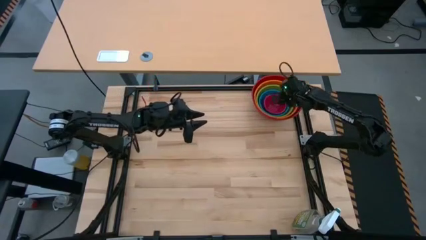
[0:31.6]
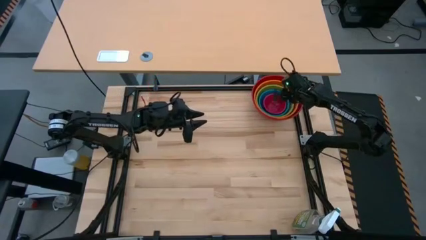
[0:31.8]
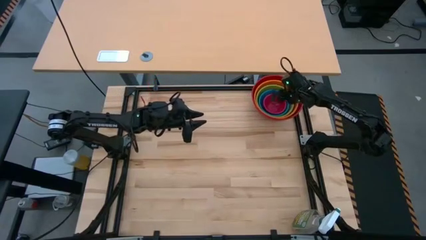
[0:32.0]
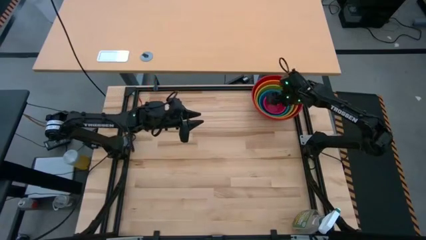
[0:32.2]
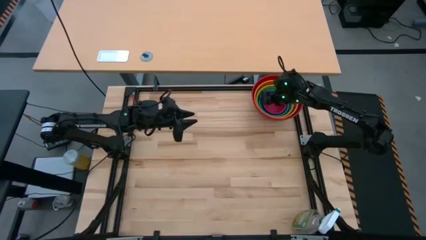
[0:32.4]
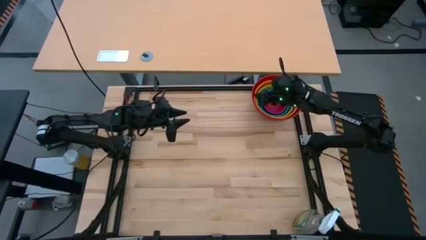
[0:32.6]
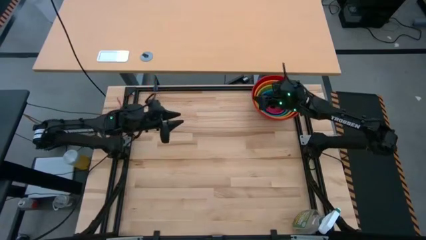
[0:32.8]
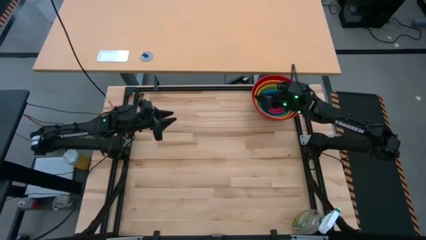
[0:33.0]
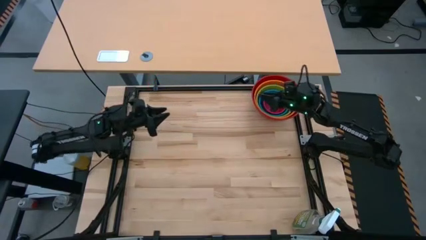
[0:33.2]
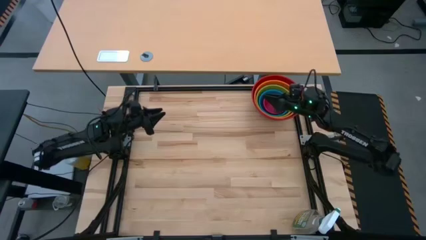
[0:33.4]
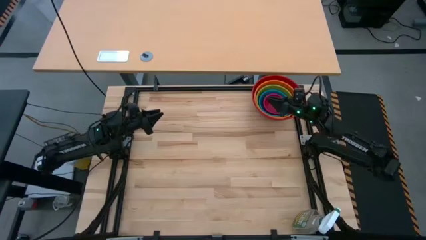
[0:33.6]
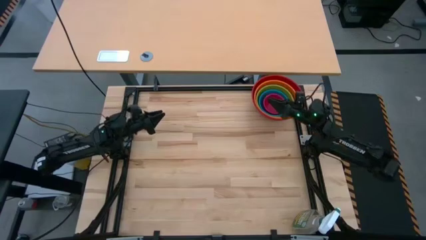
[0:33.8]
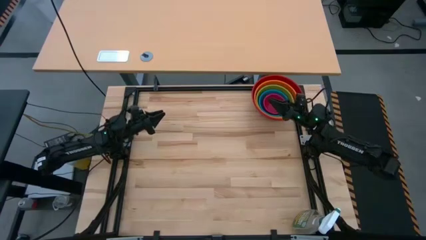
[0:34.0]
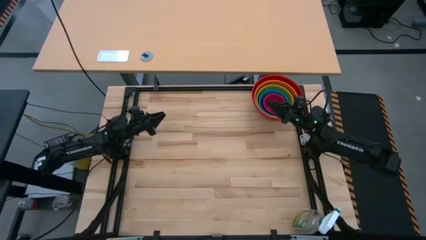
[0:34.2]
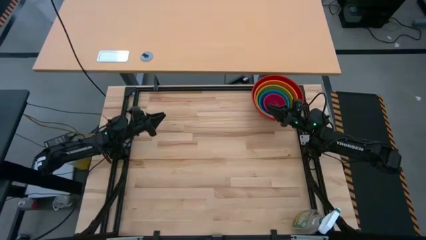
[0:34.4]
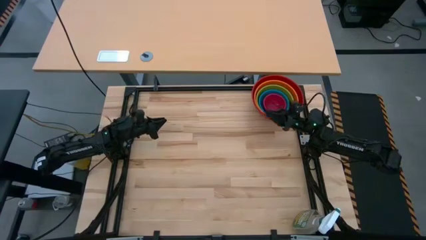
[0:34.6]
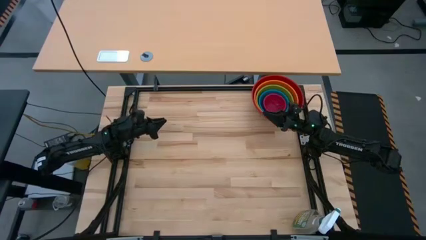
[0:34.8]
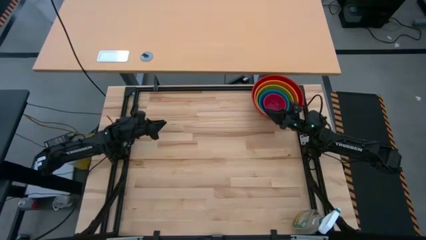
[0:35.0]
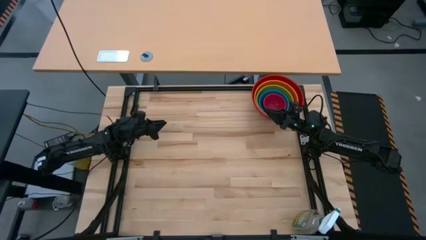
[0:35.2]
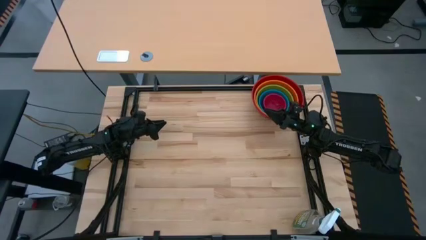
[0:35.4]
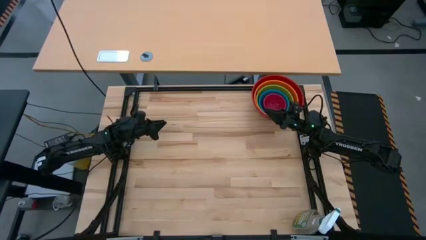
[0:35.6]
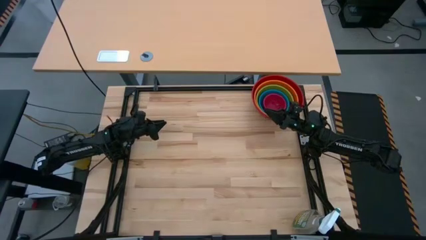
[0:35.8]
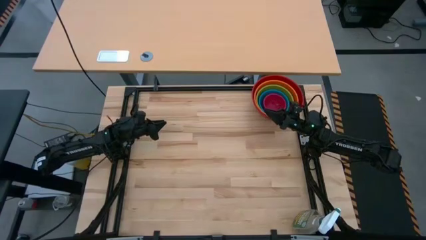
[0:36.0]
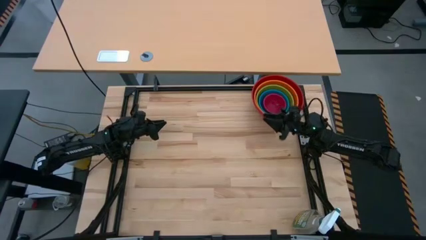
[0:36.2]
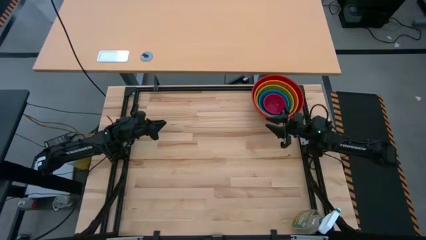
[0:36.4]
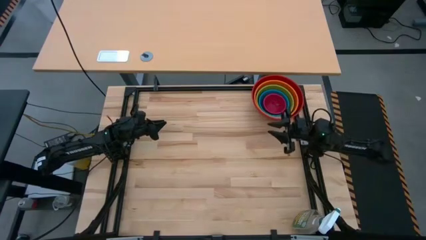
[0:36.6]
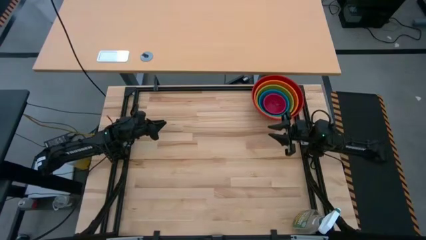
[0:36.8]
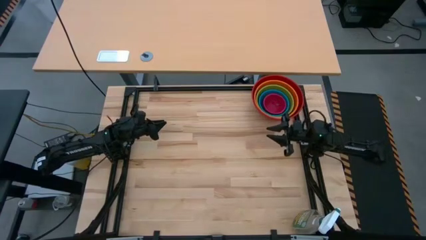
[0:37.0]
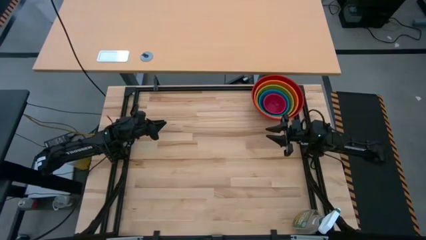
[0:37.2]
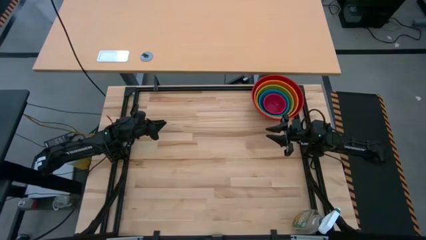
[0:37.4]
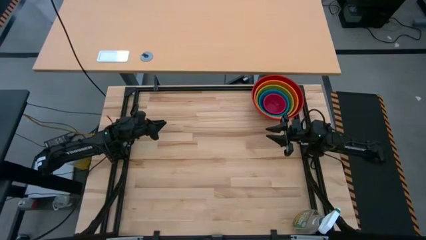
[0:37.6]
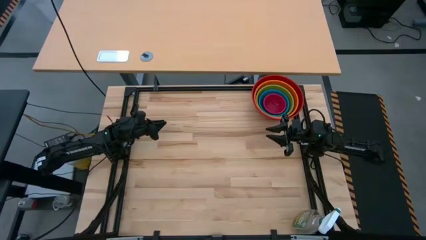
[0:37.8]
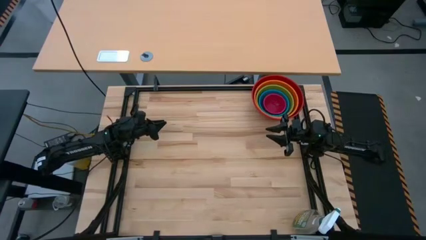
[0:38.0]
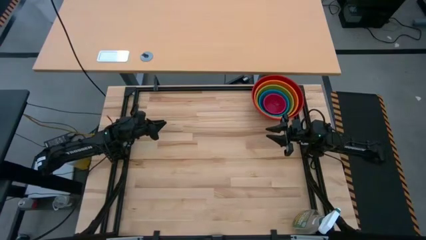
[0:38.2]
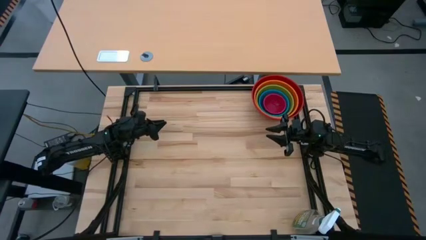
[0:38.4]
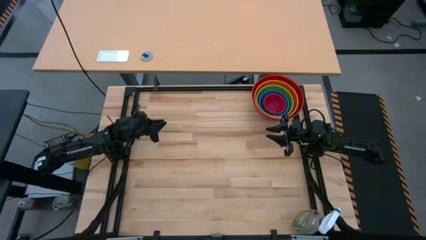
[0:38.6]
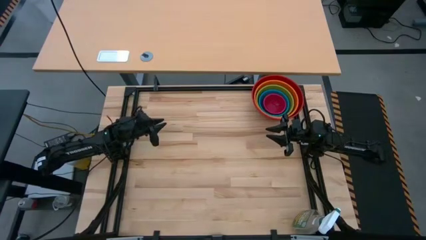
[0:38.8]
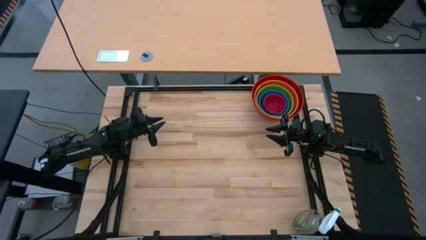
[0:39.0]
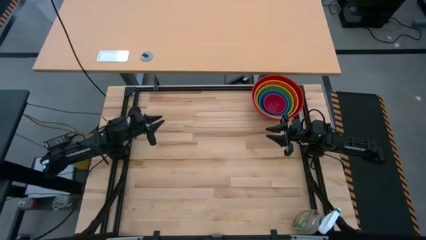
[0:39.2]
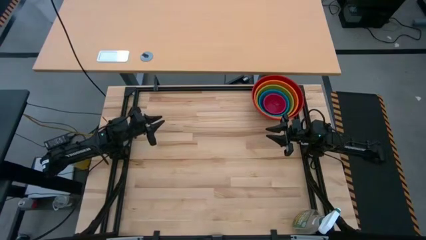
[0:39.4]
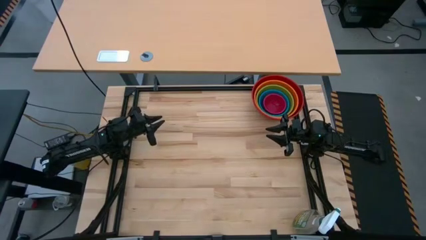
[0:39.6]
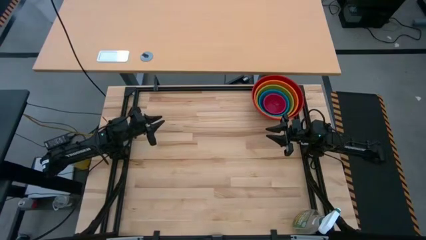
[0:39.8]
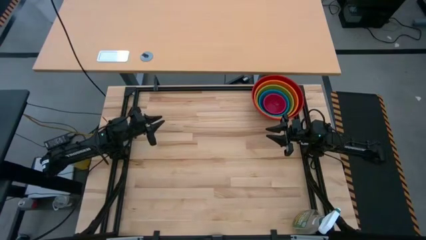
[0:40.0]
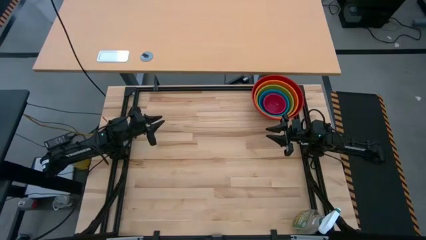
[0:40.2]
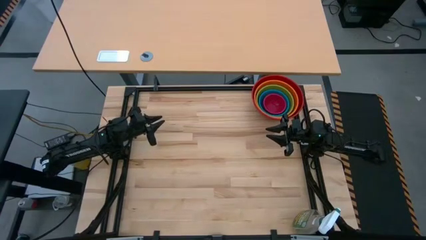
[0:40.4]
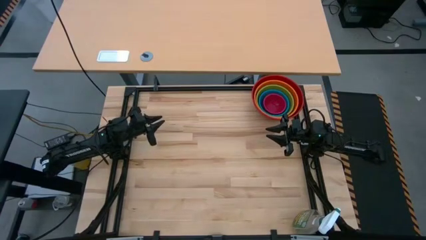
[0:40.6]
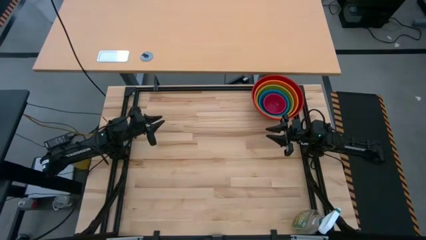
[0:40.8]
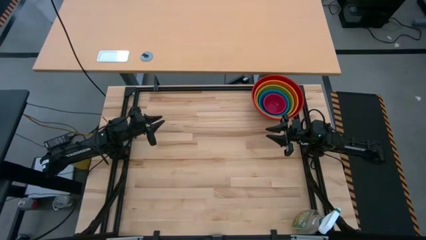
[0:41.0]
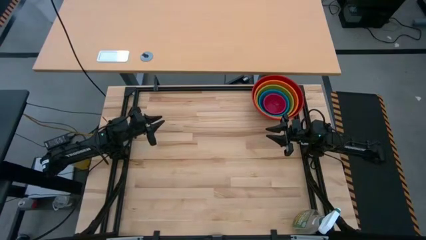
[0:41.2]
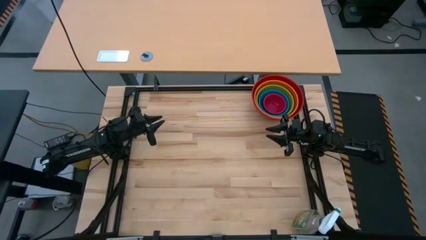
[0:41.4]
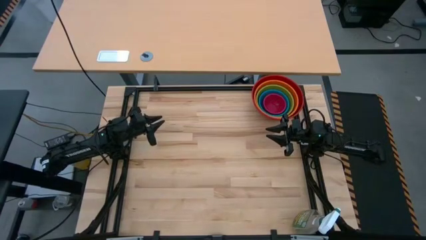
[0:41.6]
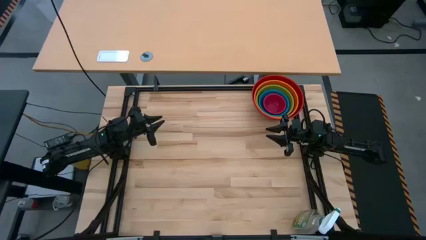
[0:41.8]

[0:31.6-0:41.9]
Return to Home Position
